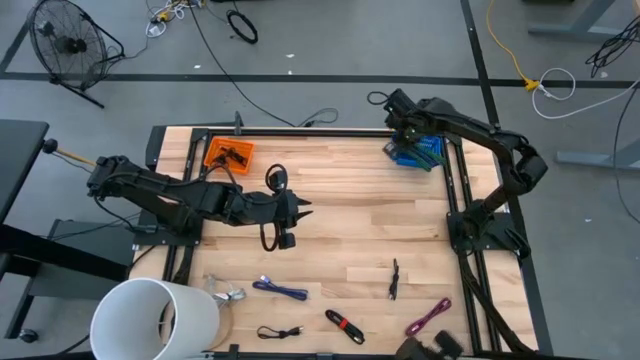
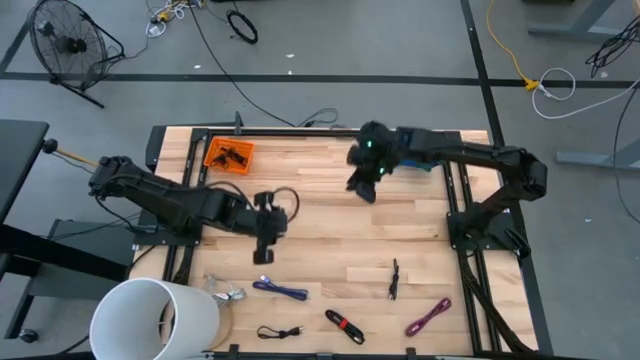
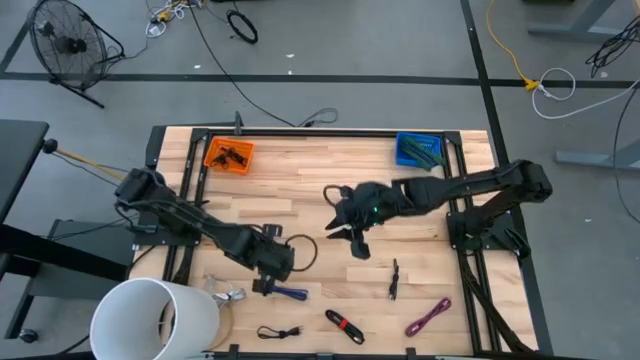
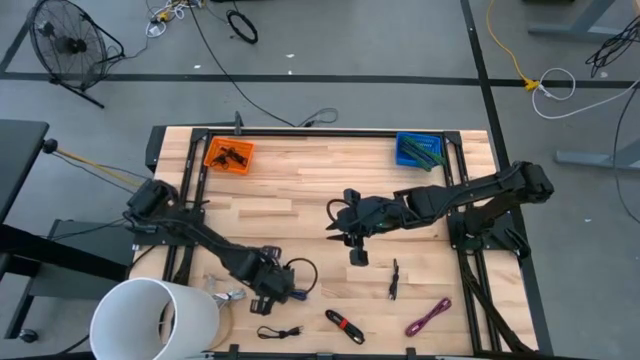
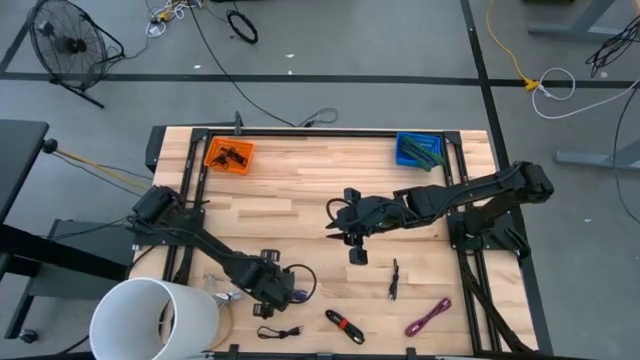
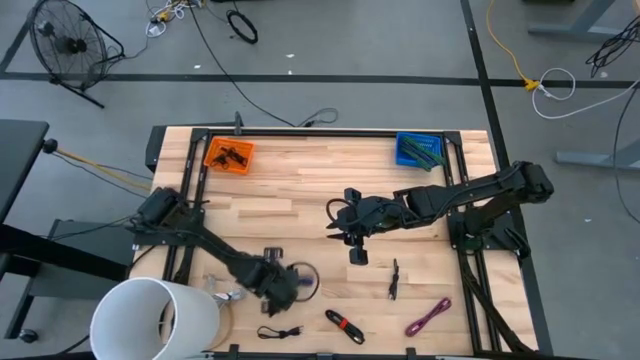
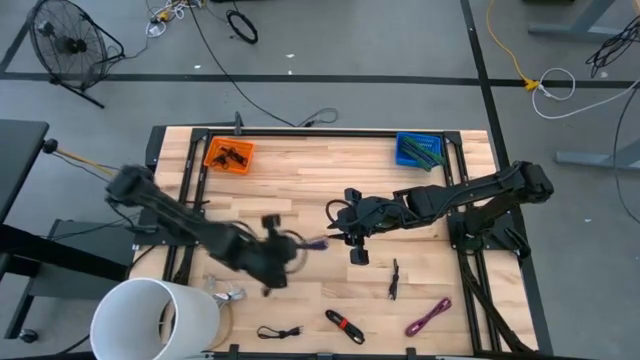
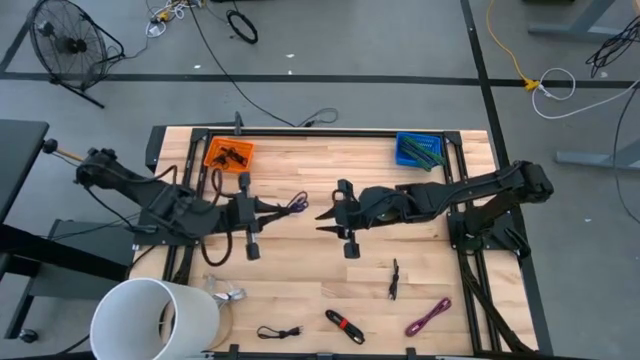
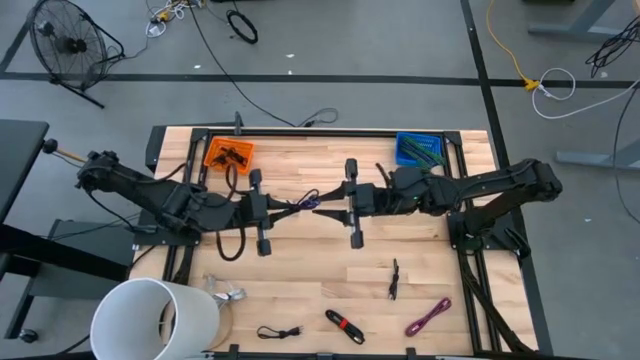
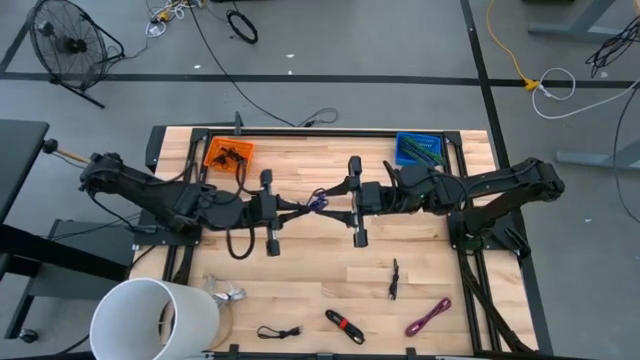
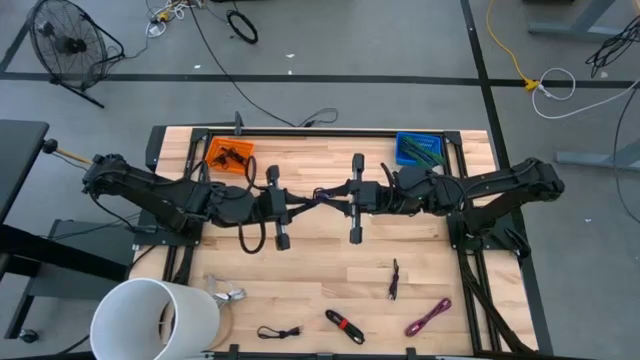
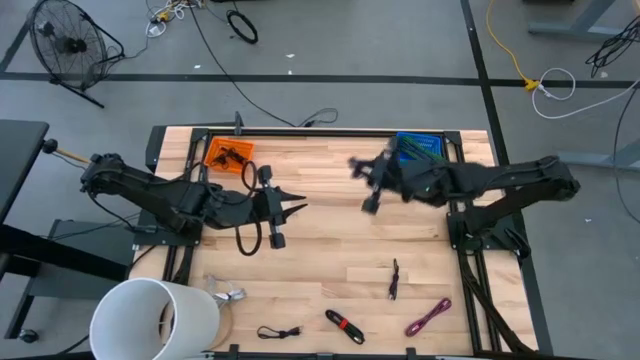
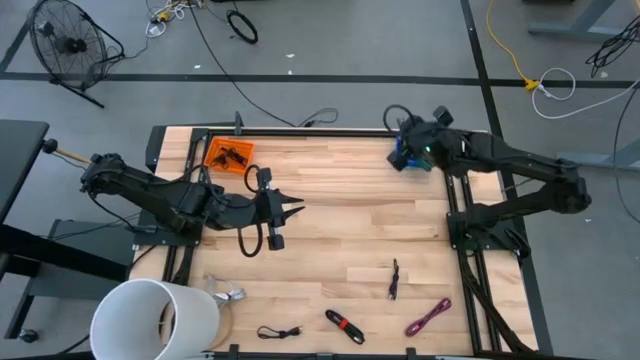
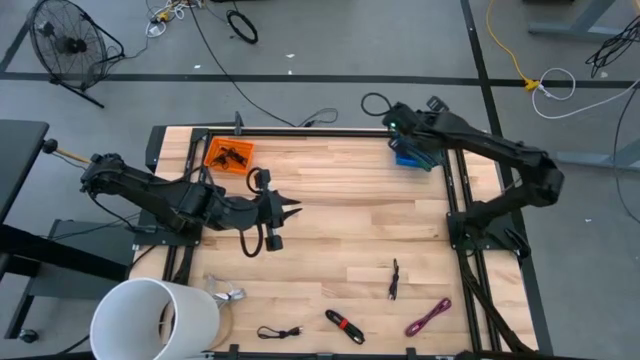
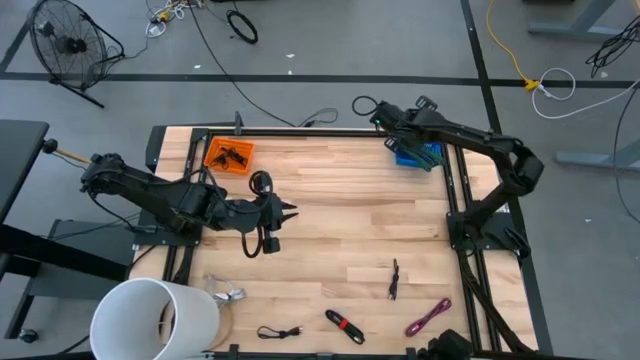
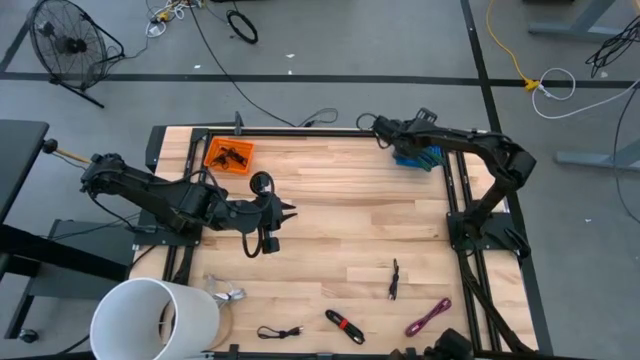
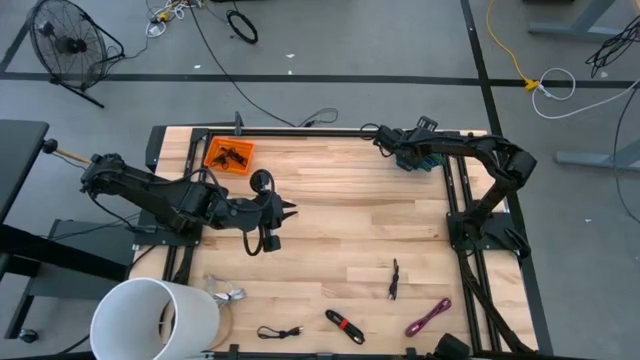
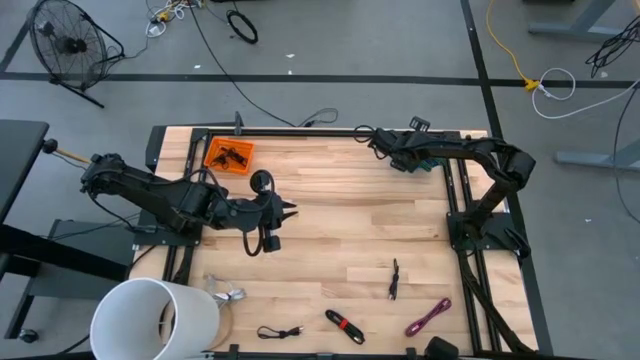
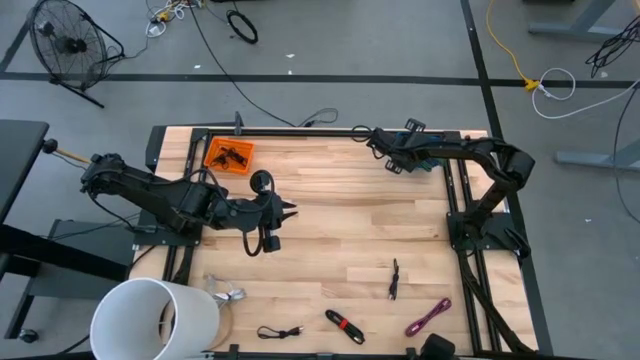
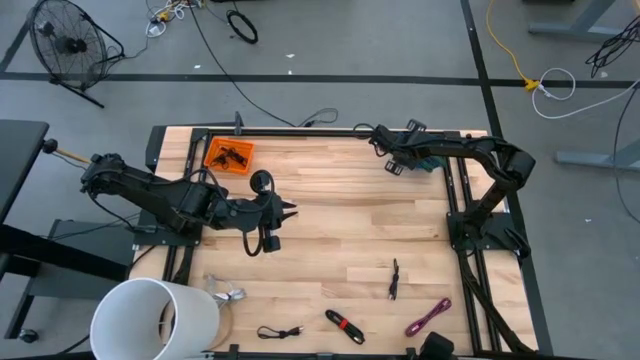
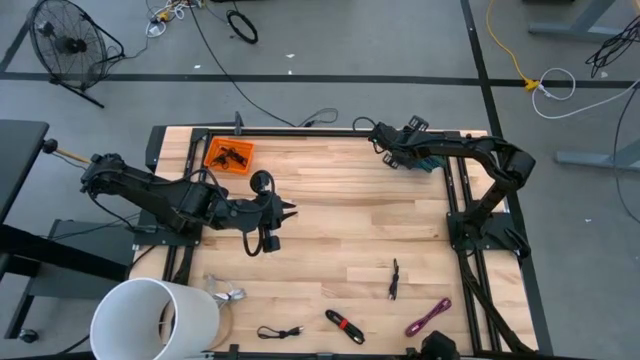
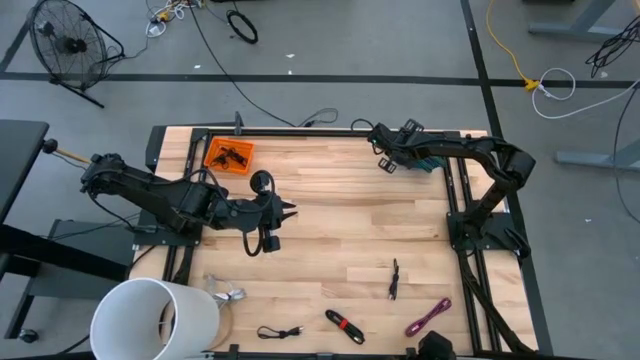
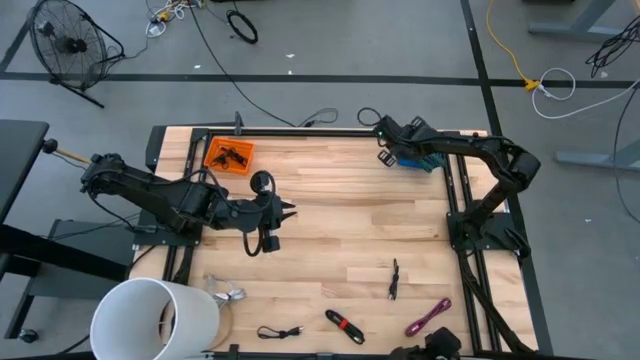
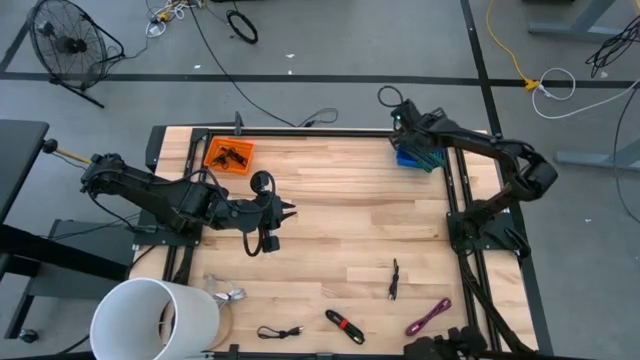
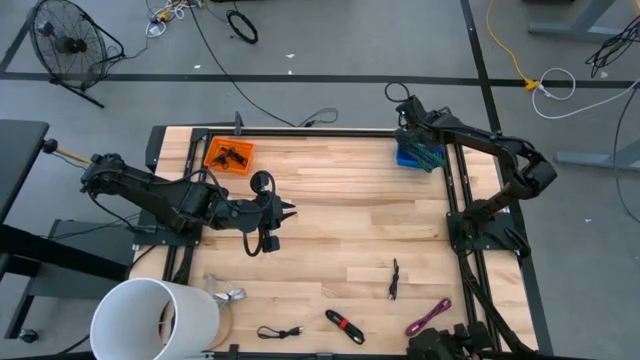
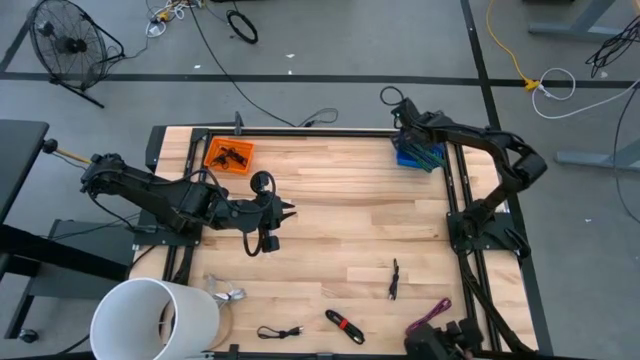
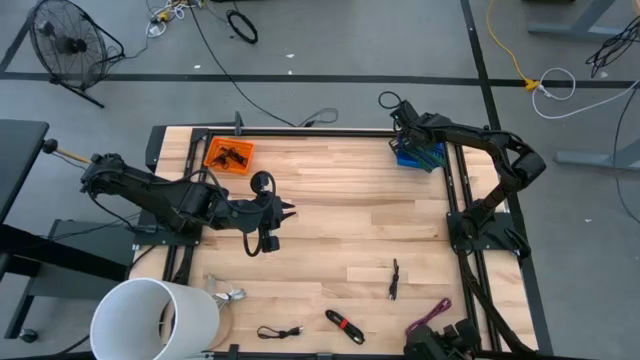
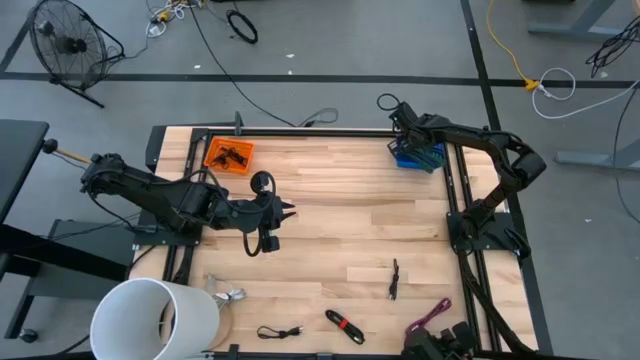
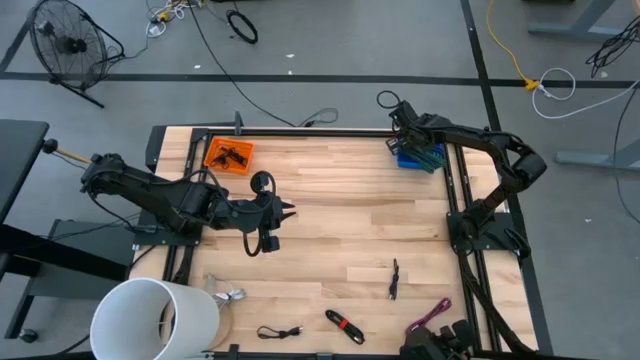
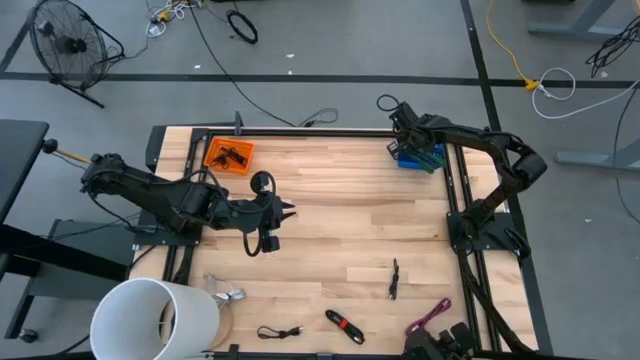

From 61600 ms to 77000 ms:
Task: Pick & Place USB Port
Put the blue charger cable into the blue bin

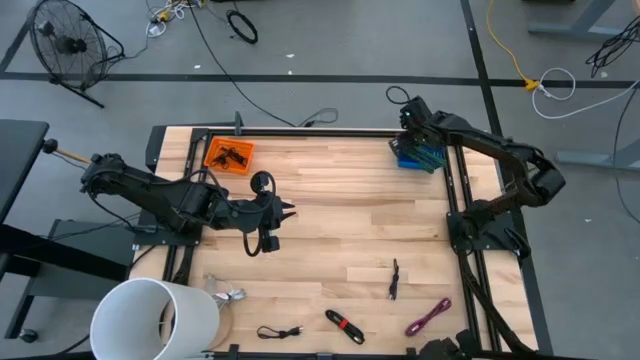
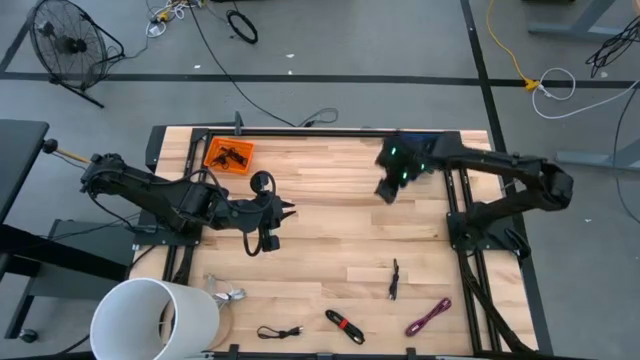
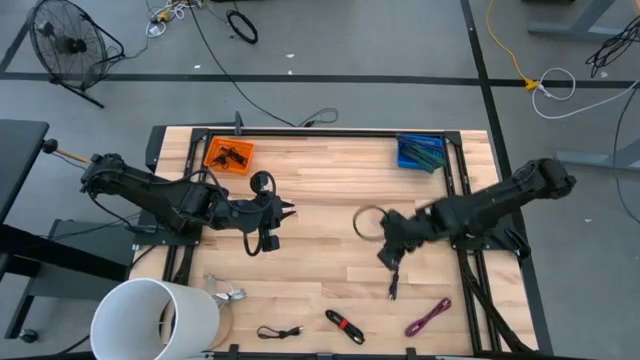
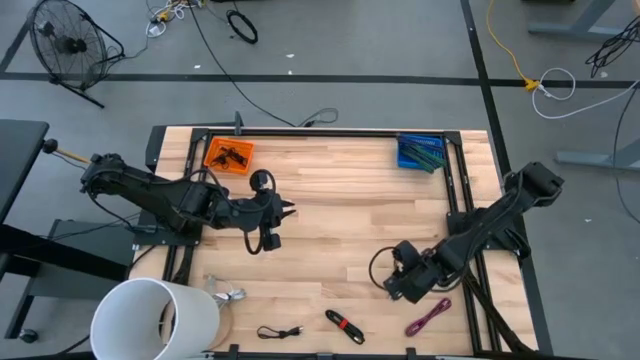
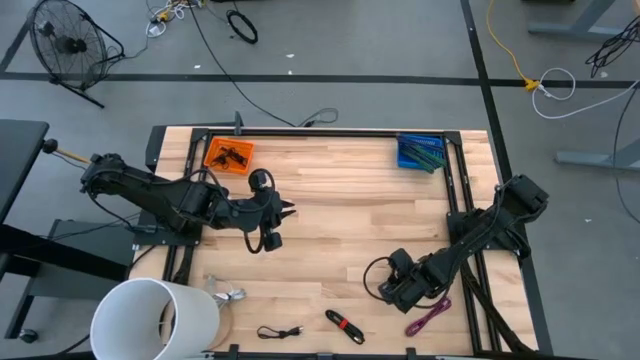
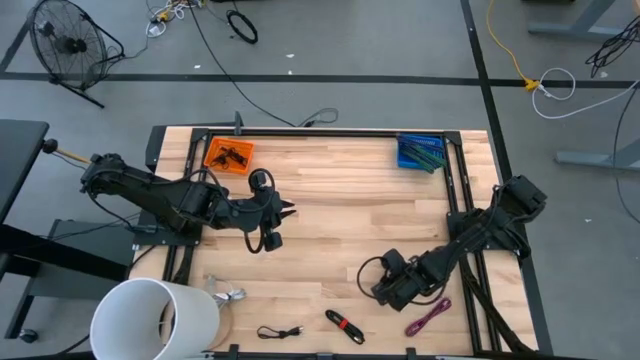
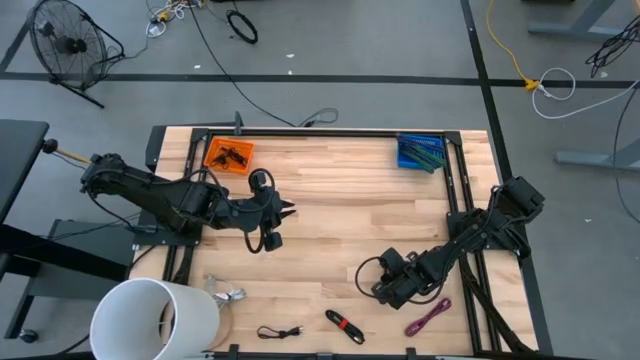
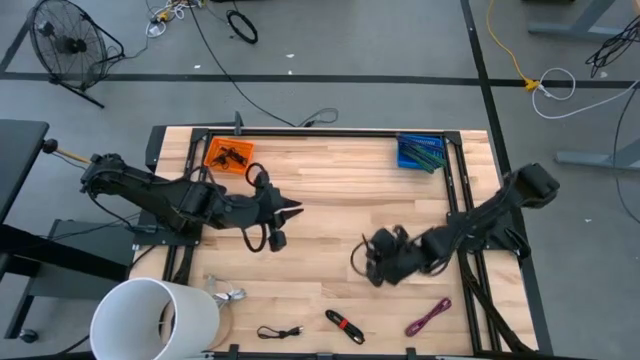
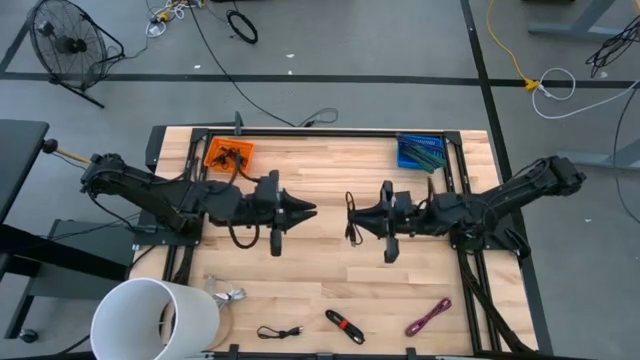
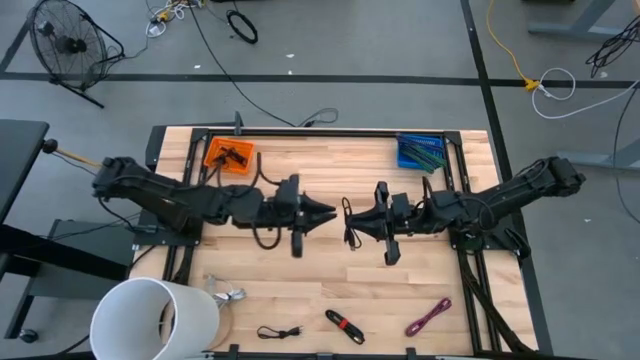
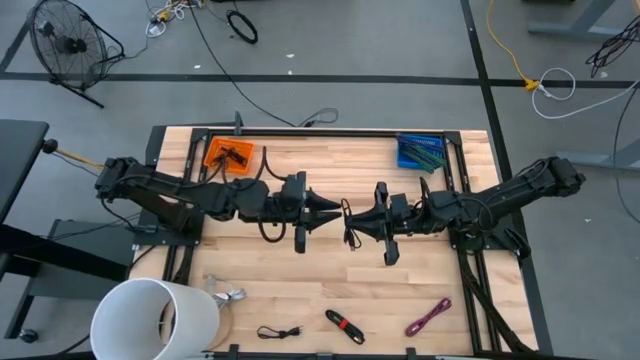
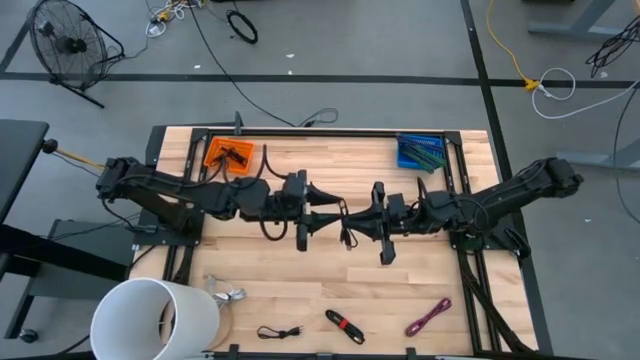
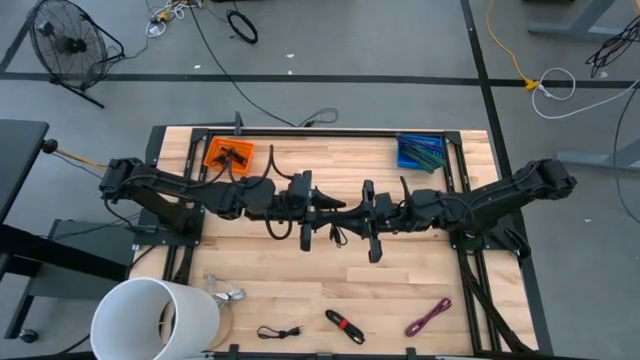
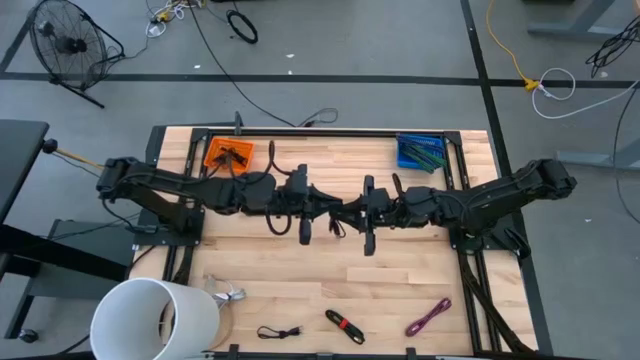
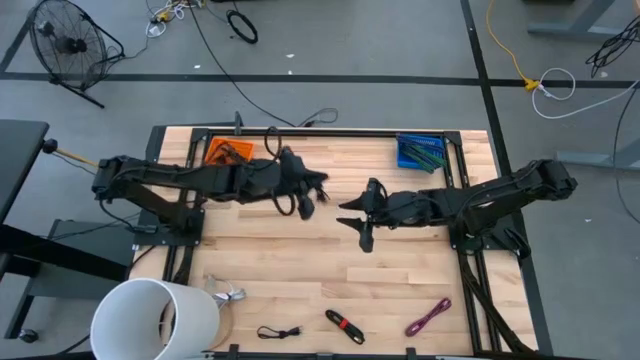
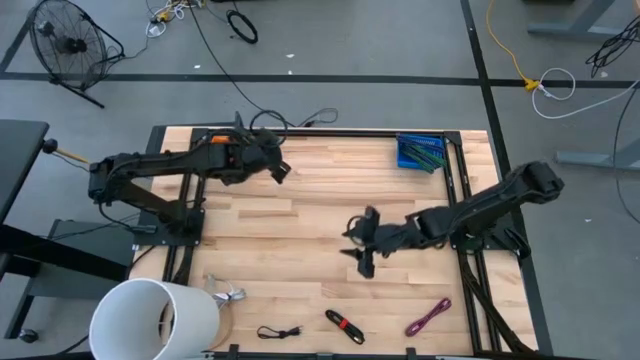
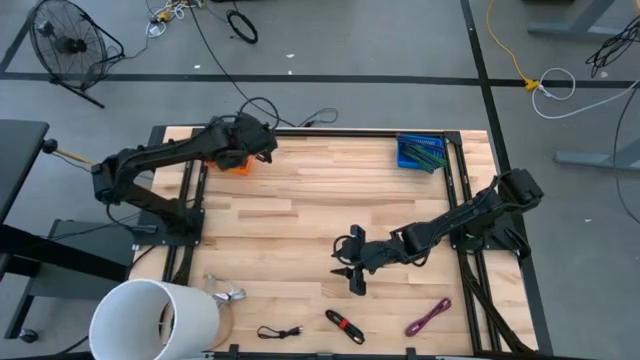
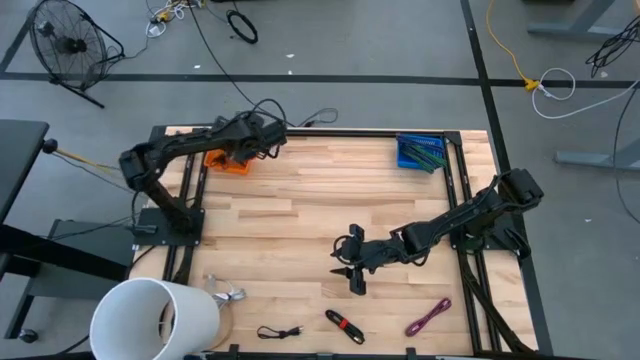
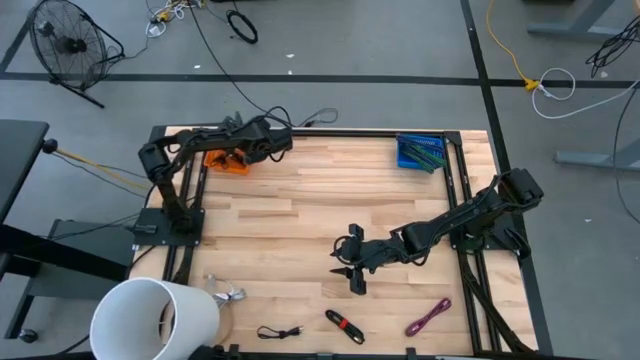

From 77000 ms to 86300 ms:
Put the black charger cable into the orange bin
